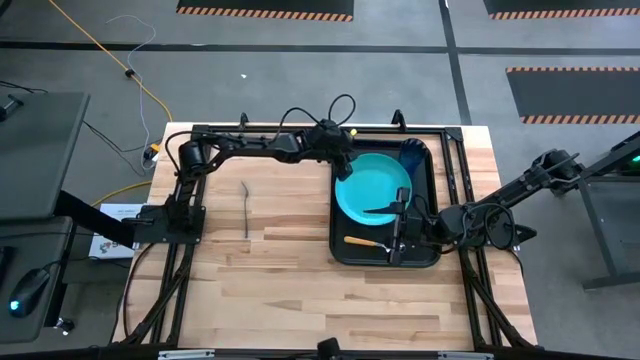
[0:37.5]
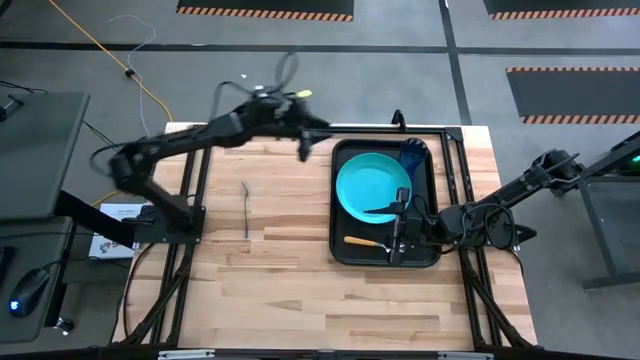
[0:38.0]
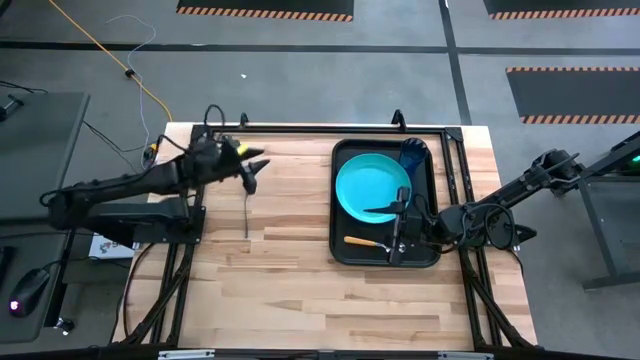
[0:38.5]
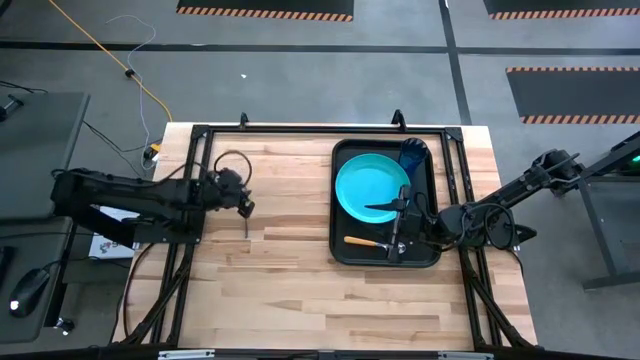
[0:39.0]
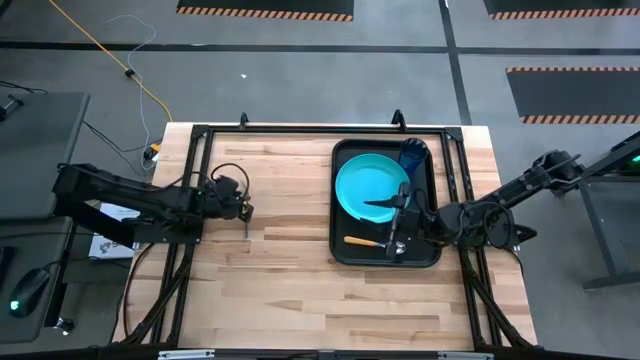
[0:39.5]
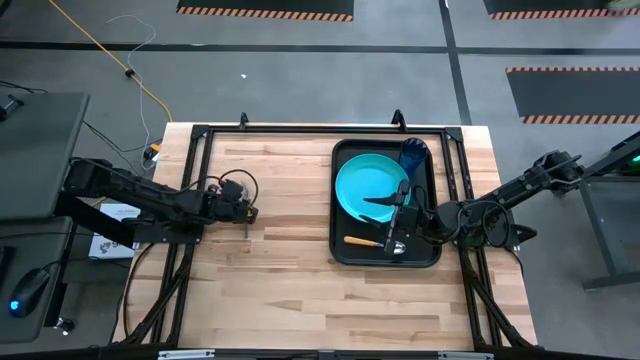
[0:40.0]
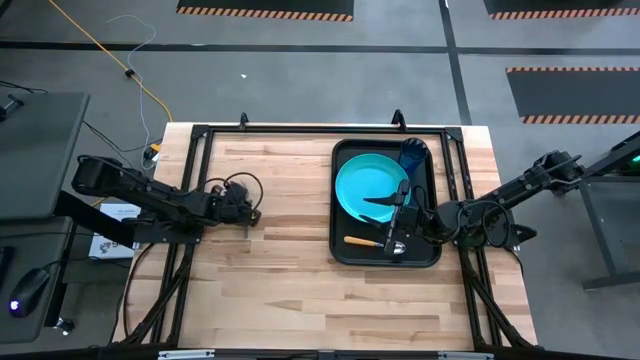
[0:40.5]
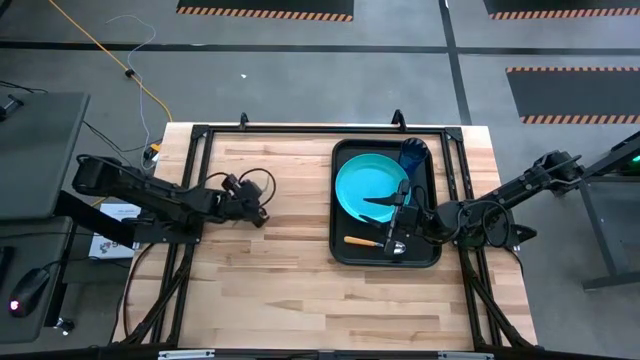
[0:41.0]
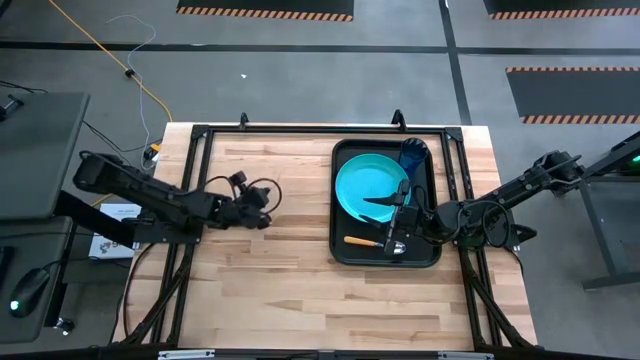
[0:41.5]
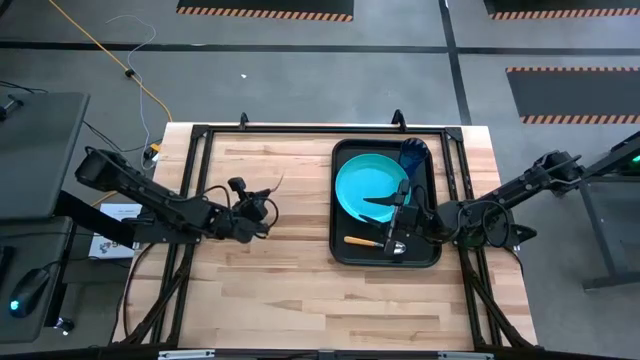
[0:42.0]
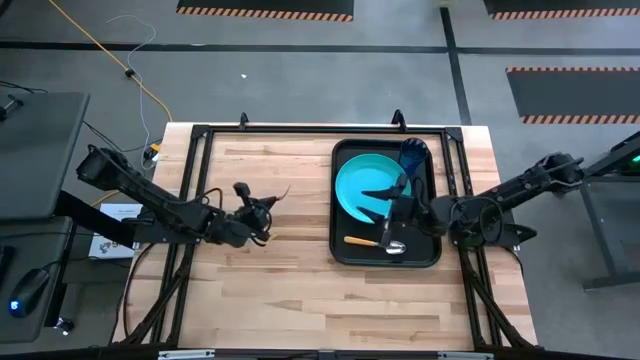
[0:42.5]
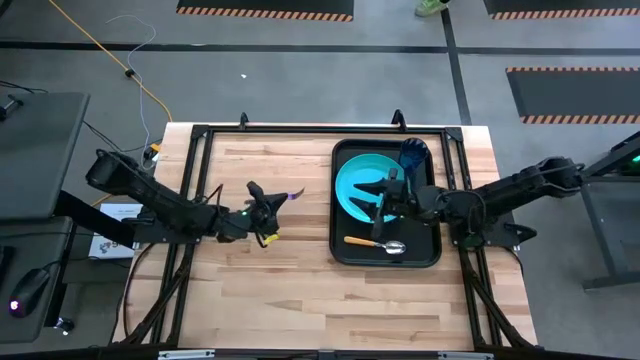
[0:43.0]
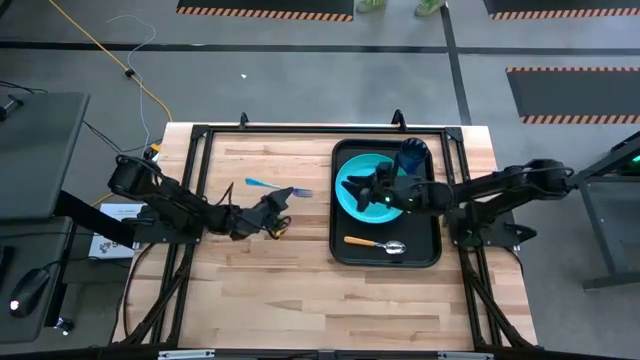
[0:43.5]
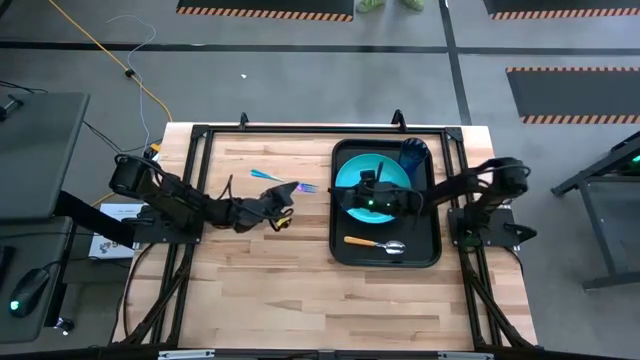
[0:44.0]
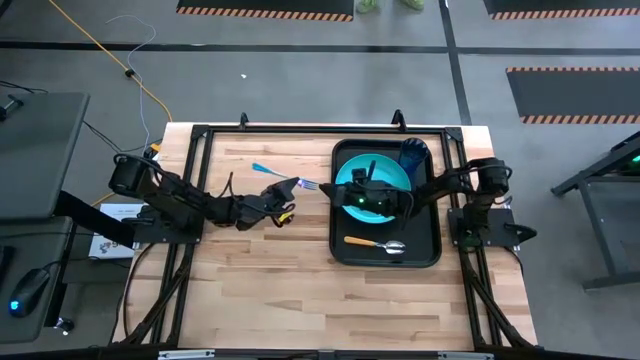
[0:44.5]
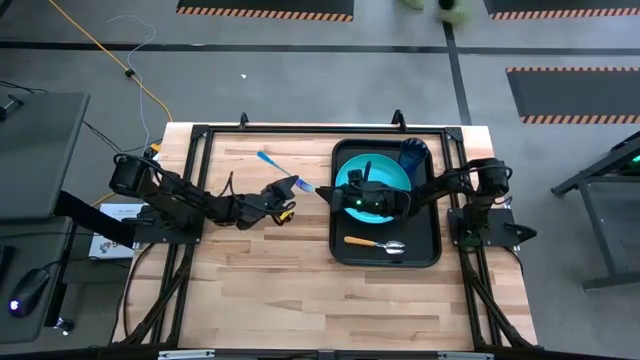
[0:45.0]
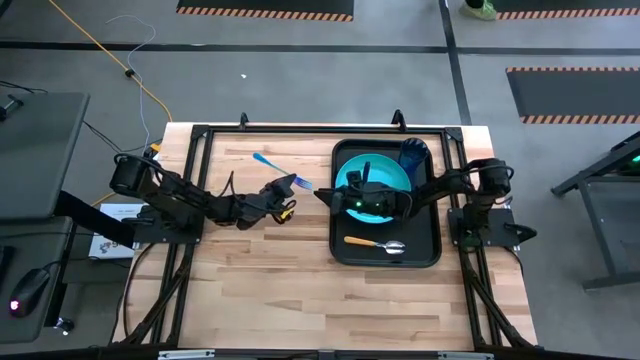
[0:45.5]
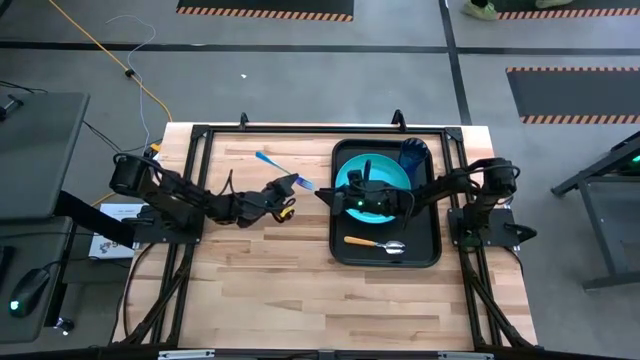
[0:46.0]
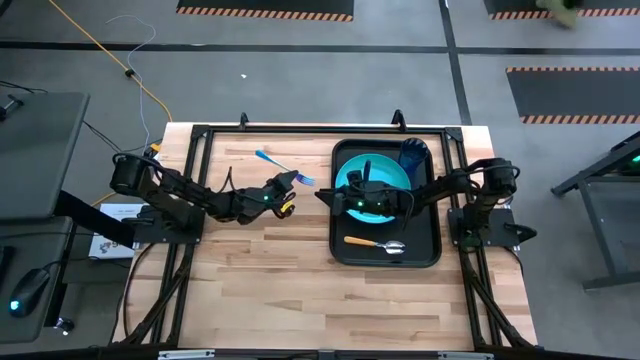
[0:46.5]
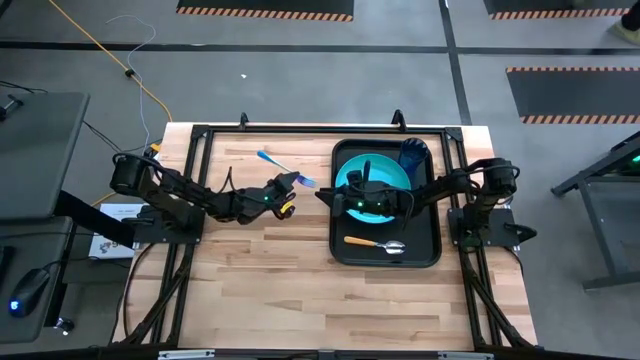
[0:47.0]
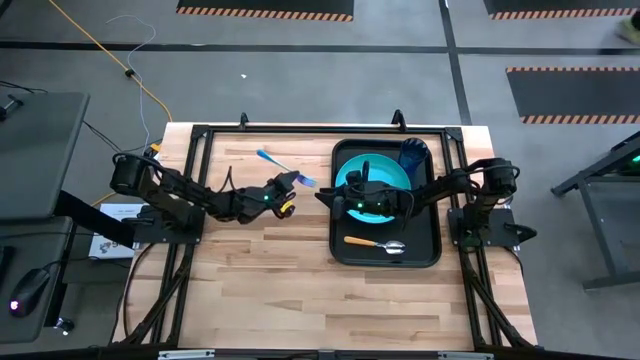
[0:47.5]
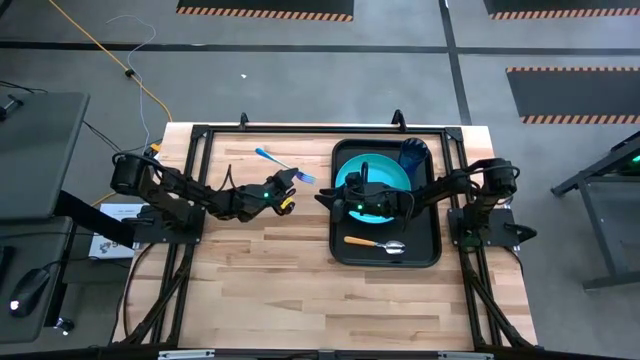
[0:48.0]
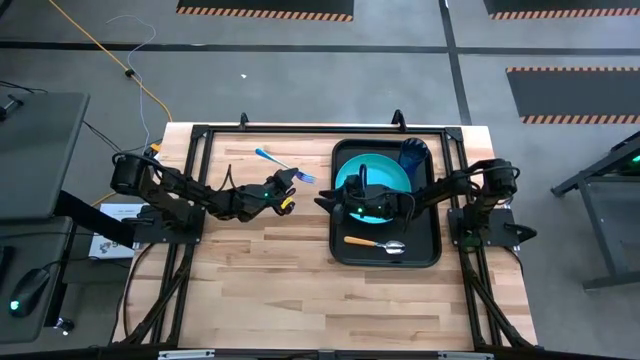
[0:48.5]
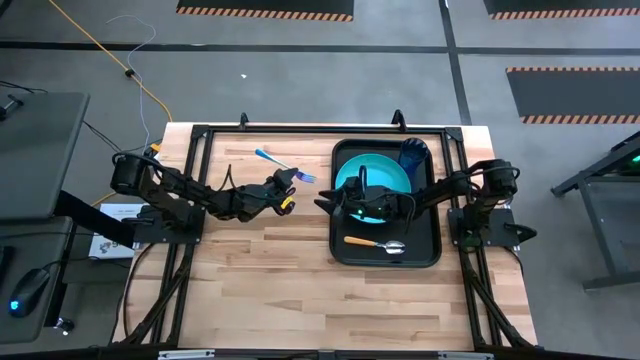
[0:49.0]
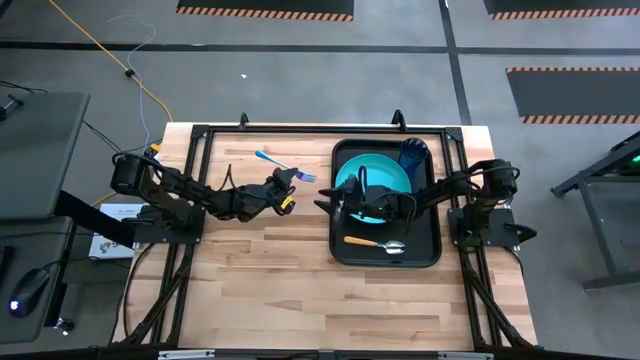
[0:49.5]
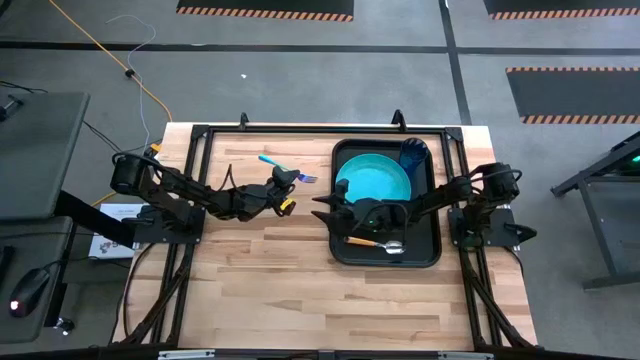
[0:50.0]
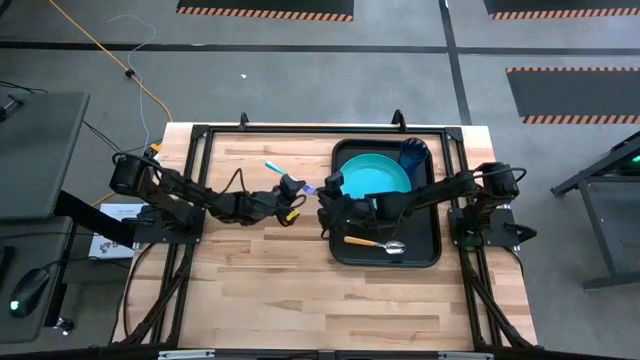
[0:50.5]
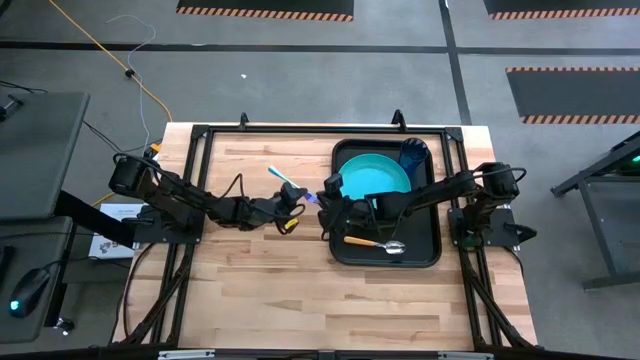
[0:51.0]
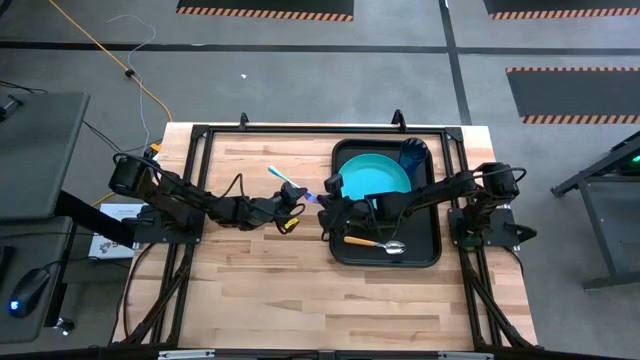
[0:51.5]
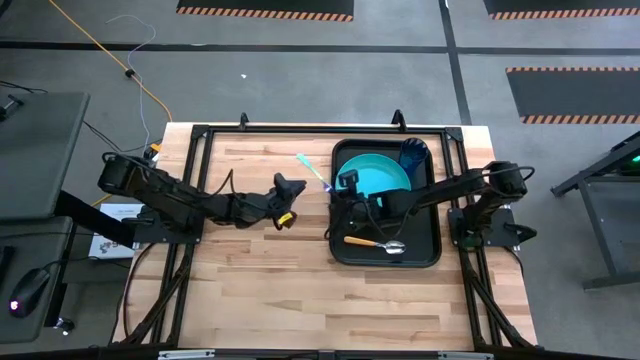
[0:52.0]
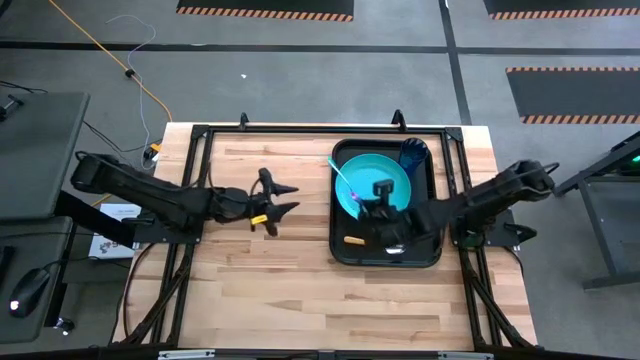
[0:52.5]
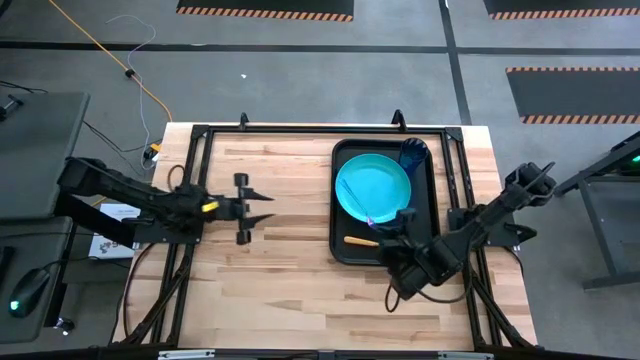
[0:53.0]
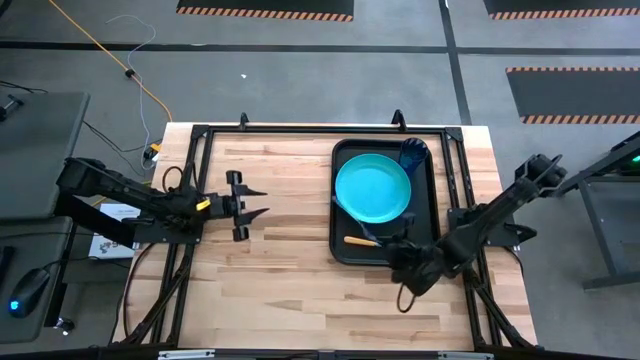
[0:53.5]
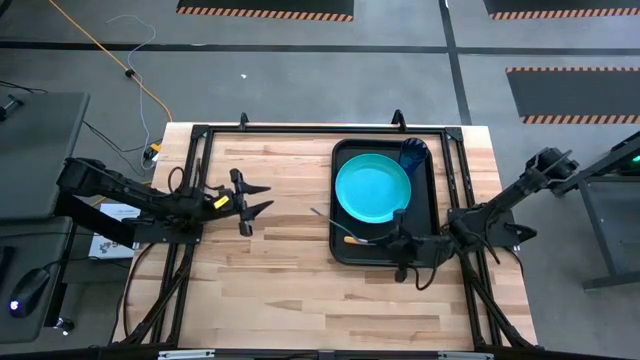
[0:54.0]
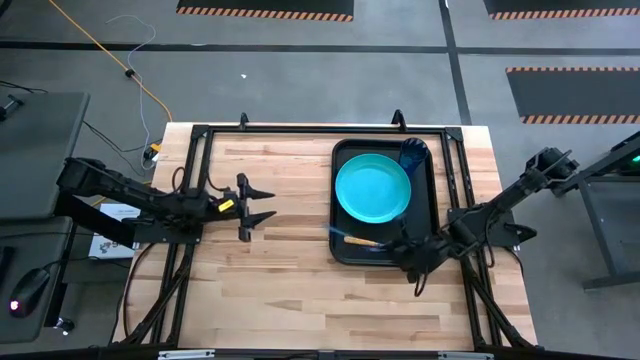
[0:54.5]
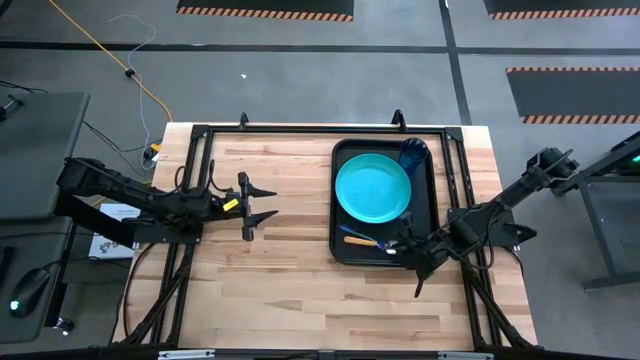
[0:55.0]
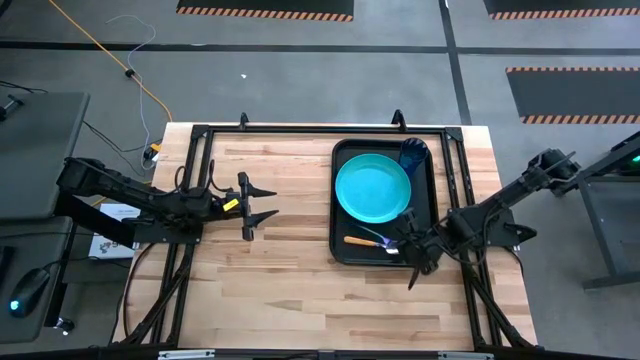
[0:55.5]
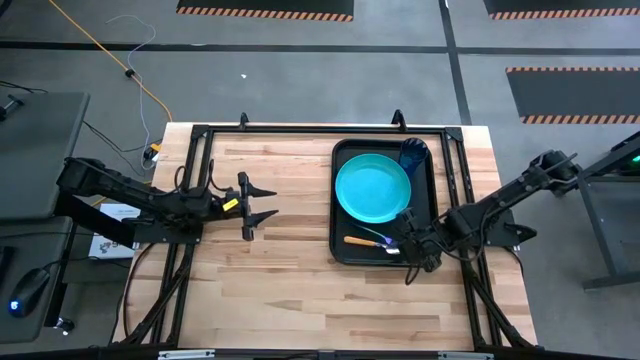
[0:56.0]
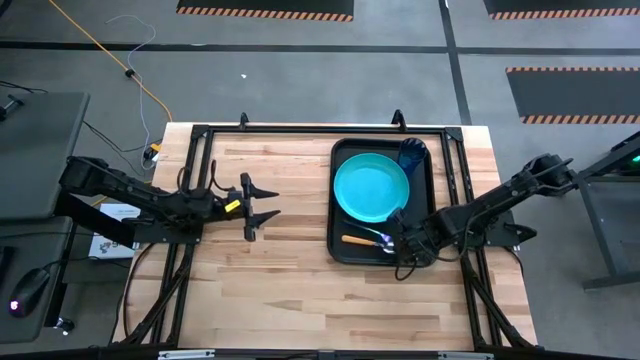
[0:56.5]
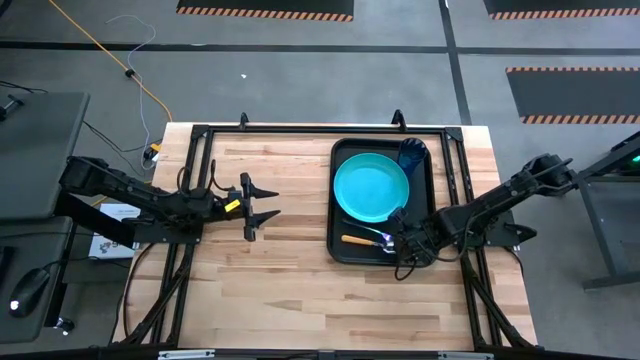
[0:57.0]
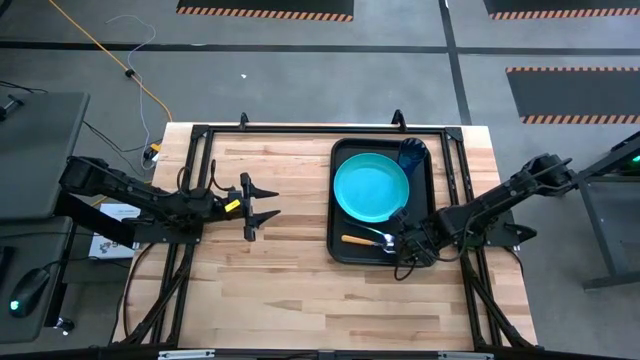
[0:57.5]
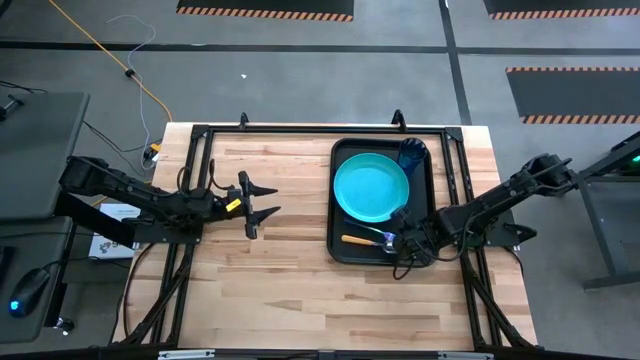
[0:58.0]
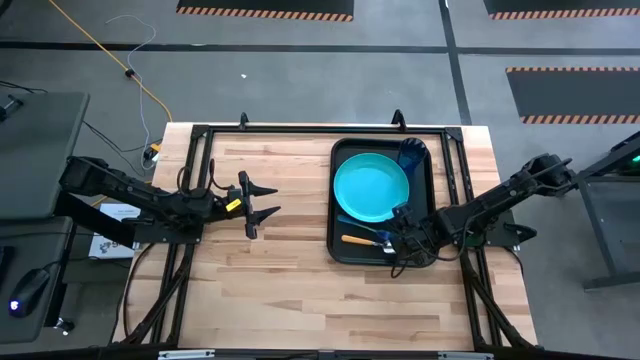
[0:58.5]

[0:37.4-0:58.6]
Task: Pick and place plate/cup/fork/spoon on tray
Put the blue fork to the left of the orange spoon on the black serving tray
